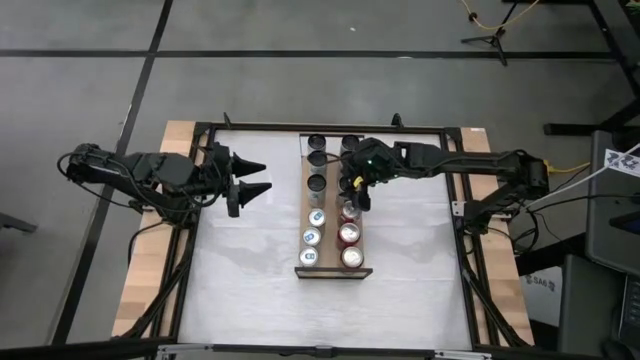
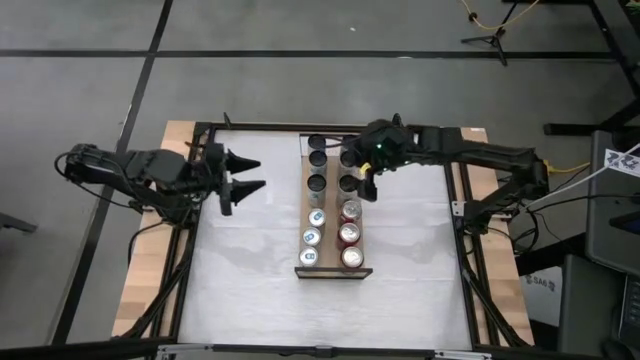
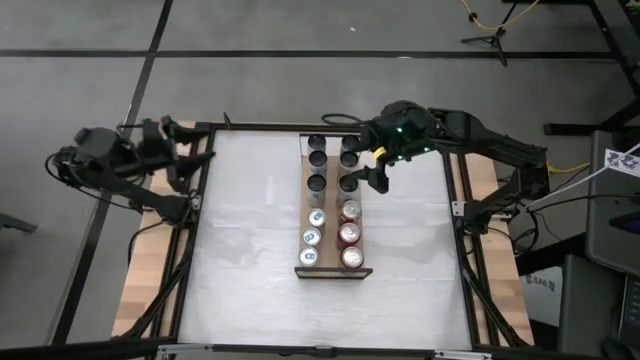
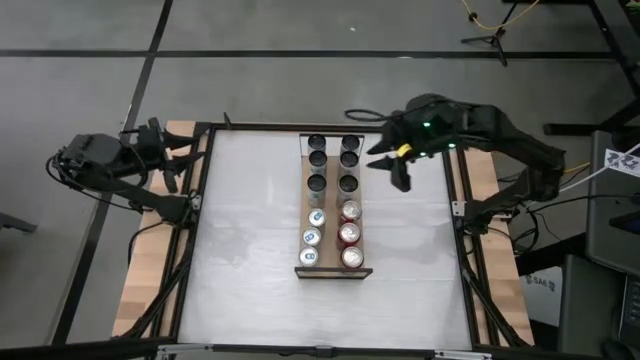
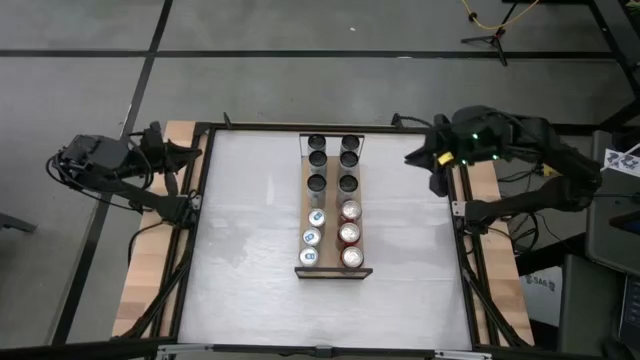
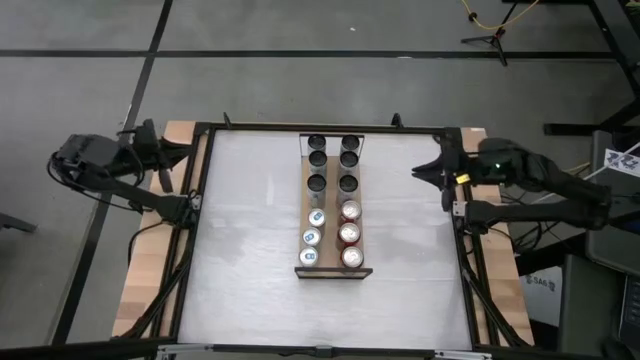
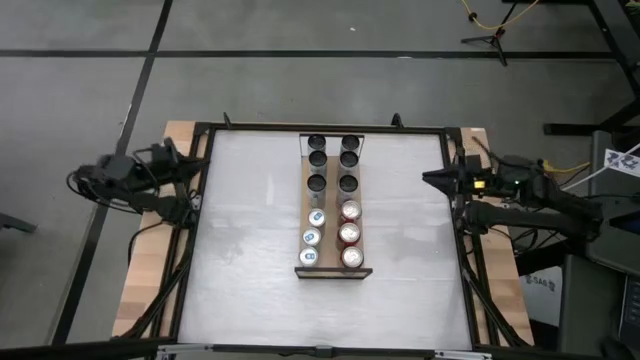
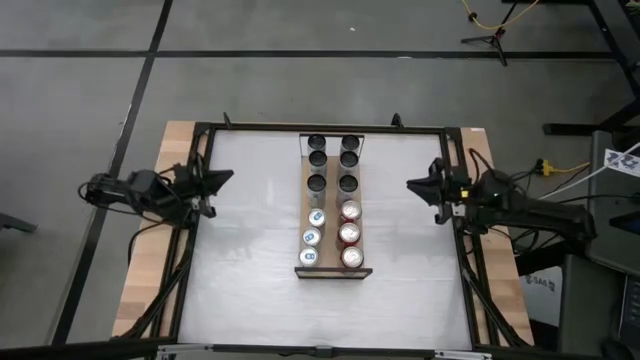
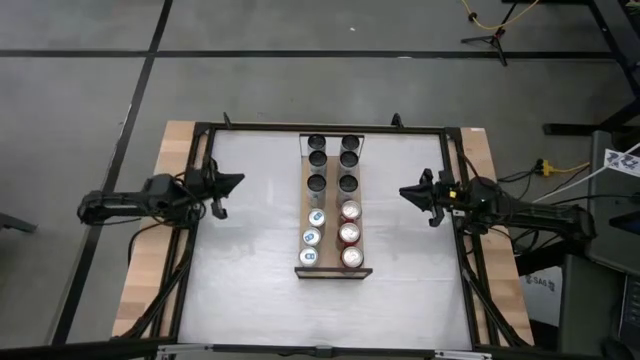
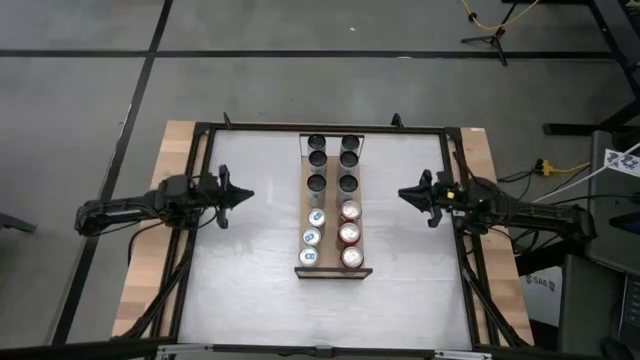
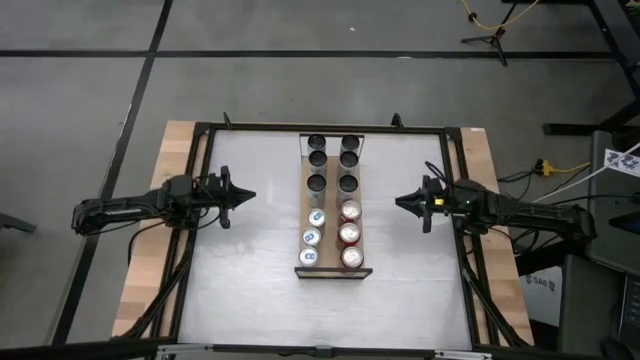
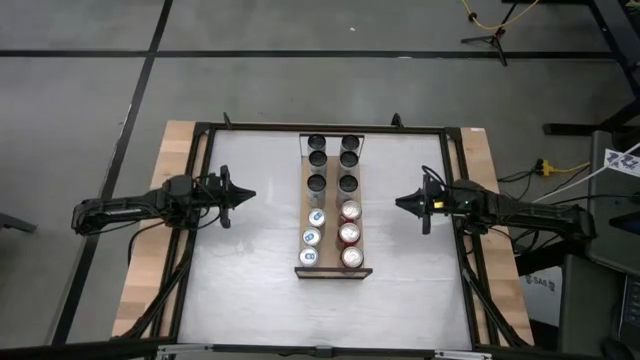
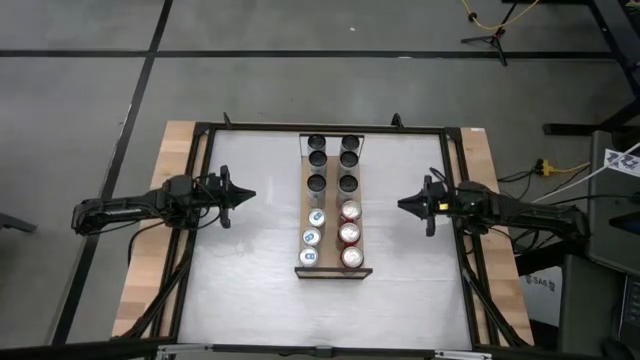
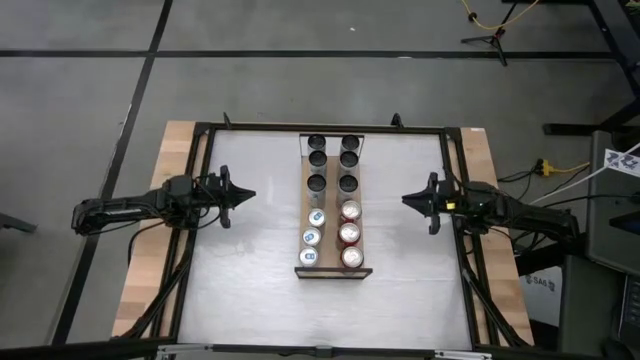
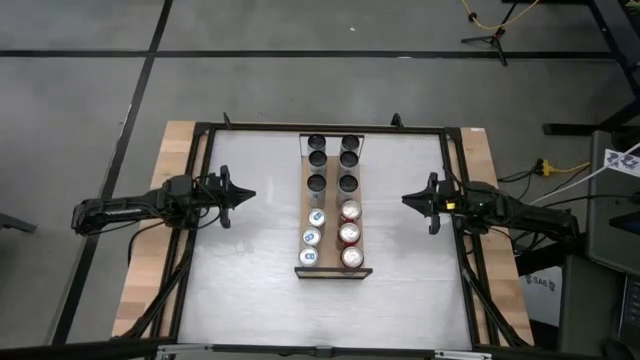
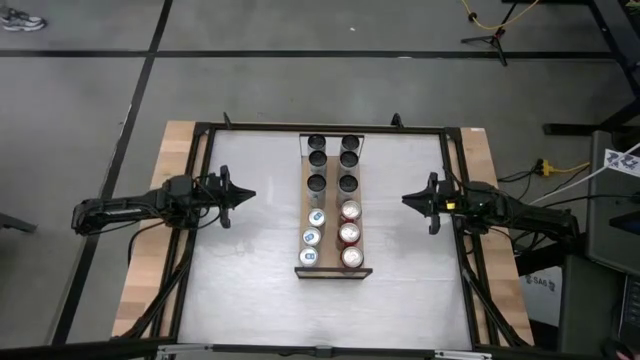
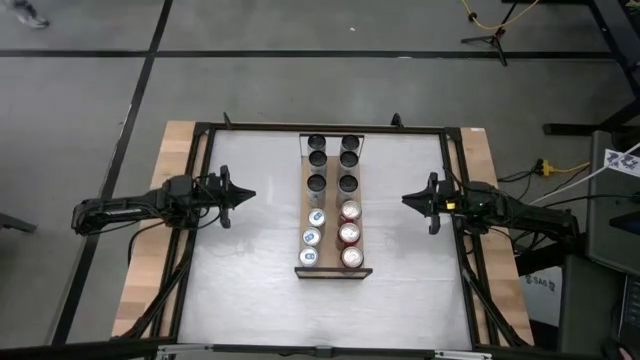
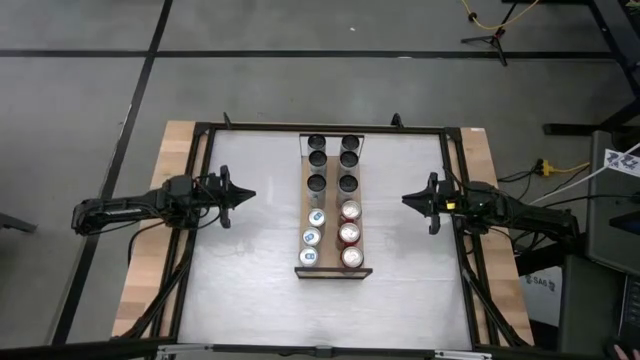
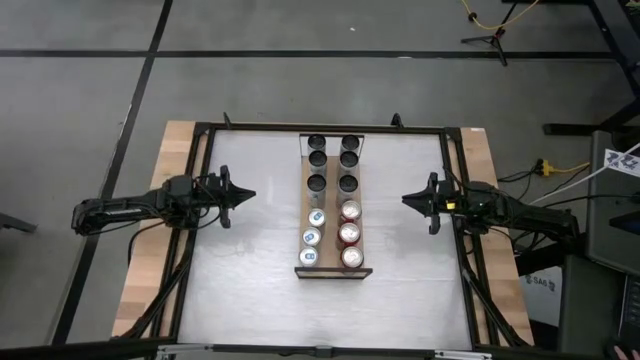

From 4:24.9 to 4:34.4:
Task: Place canned beverage on shelf
Return to Home Position

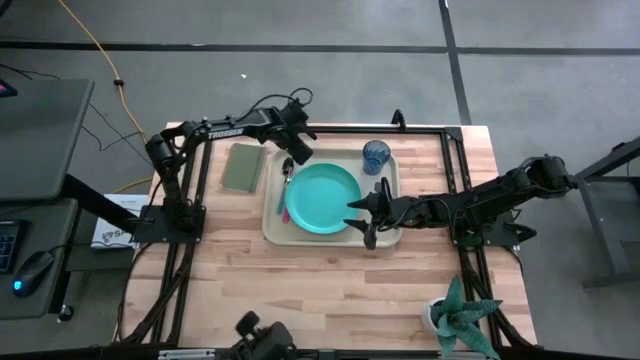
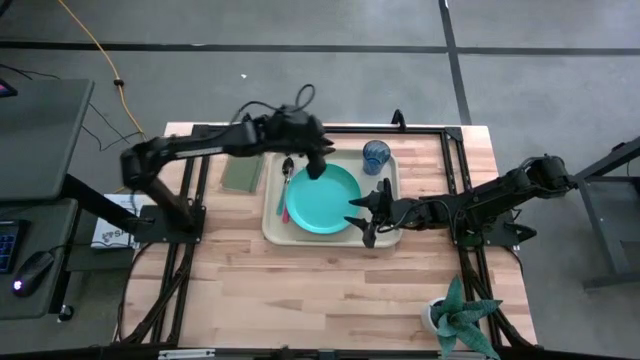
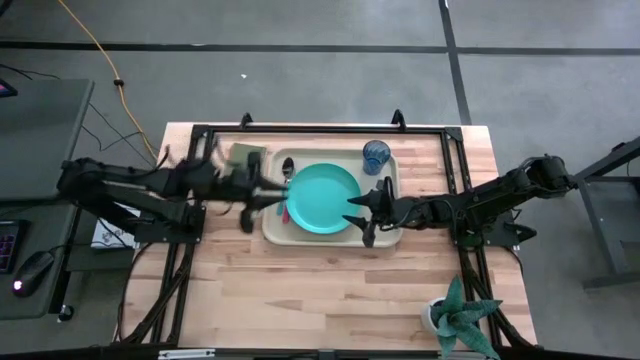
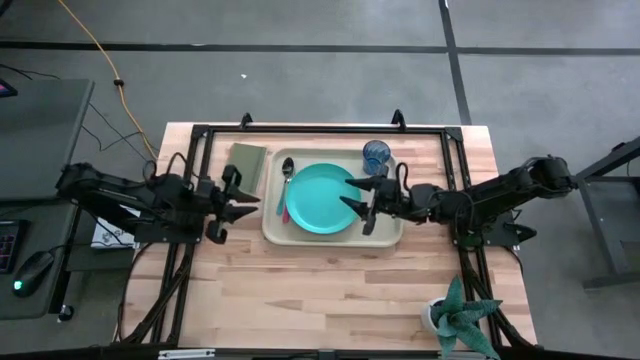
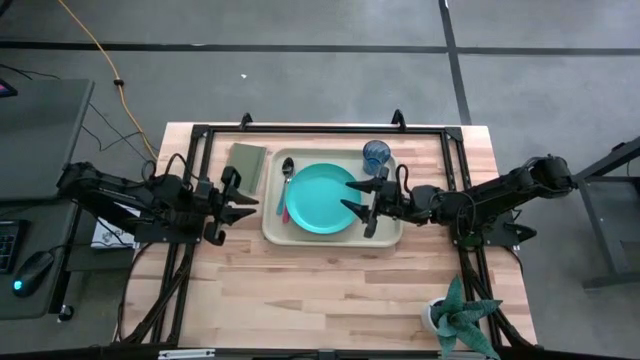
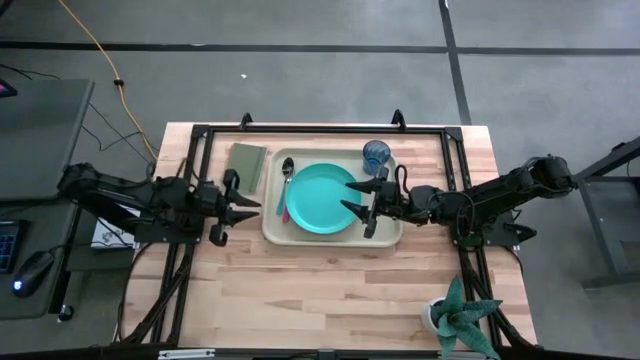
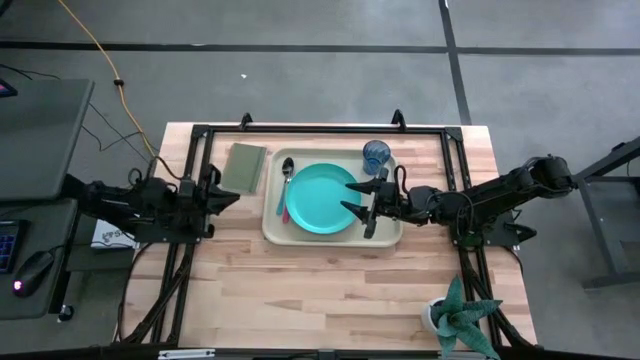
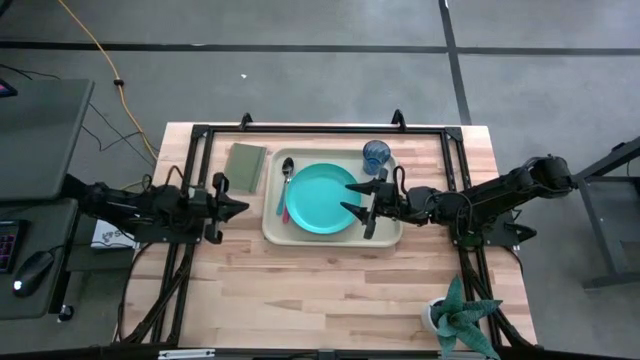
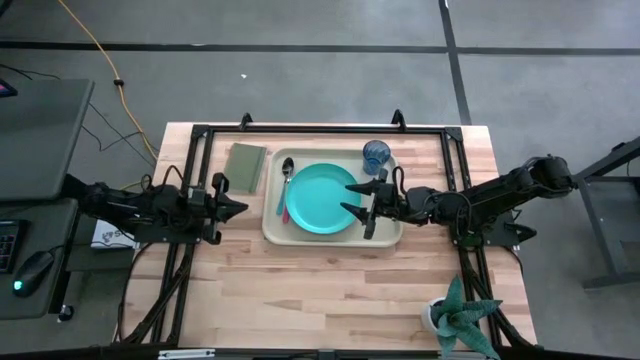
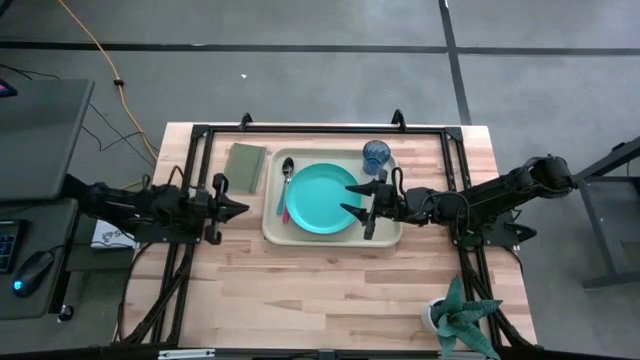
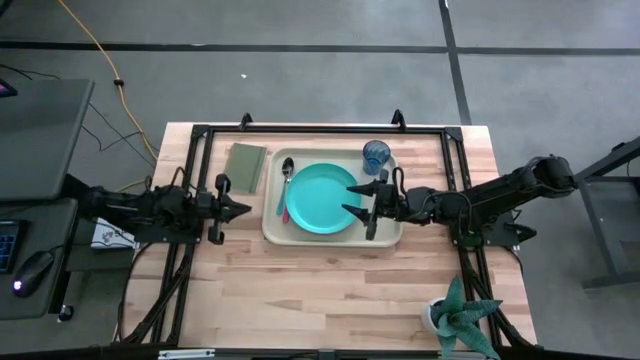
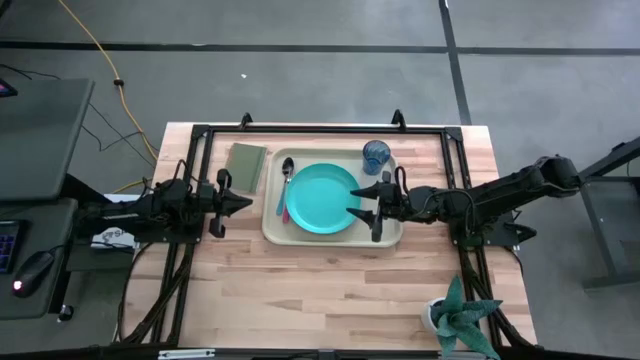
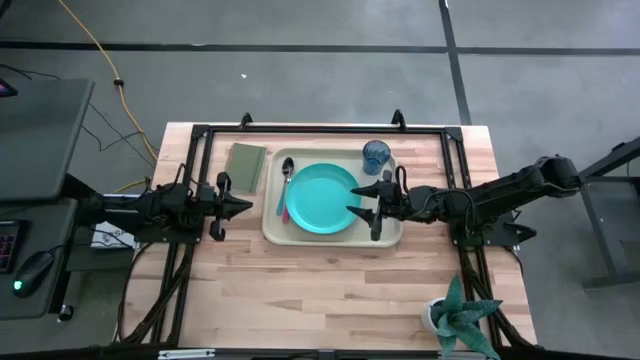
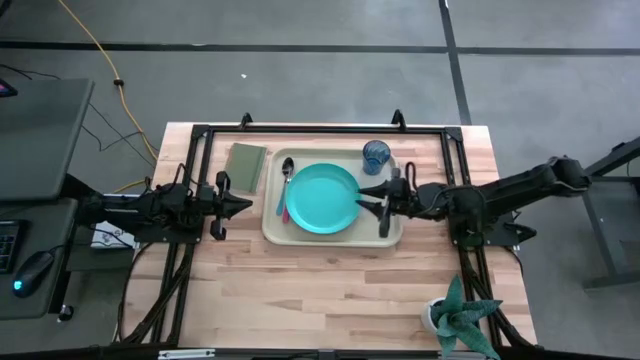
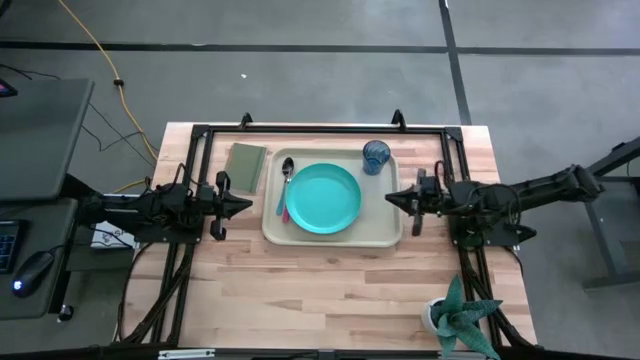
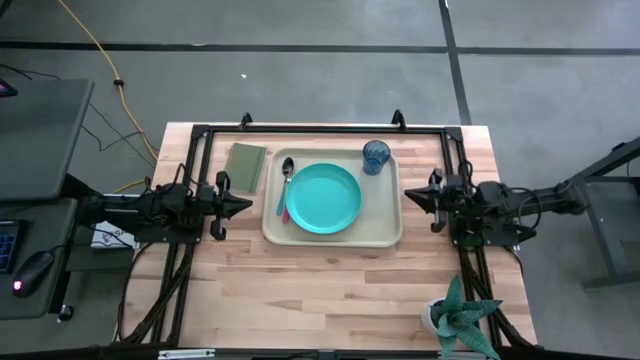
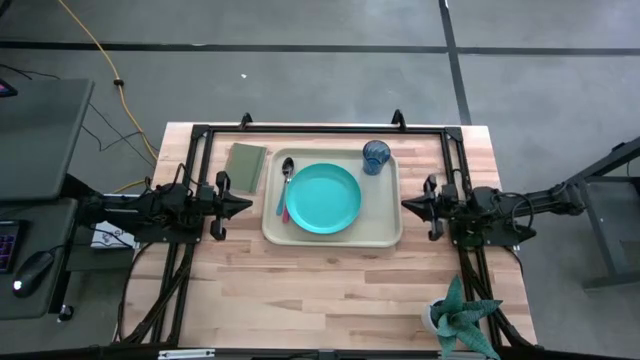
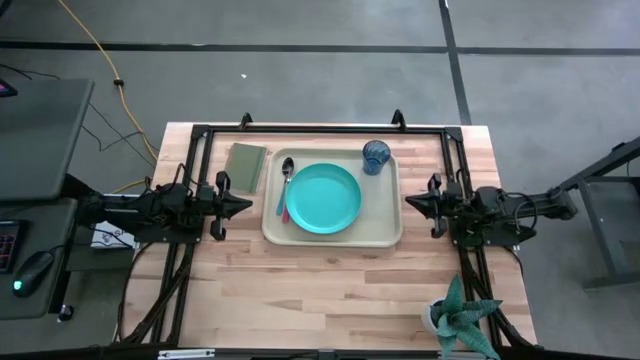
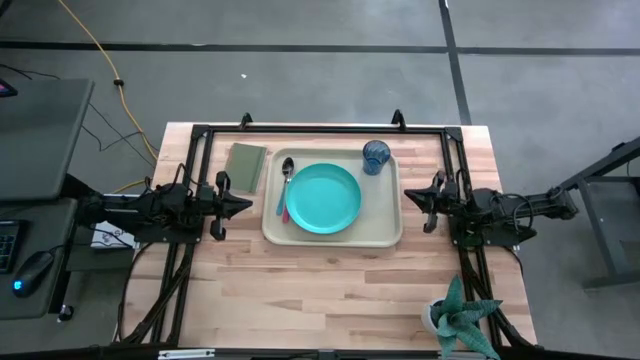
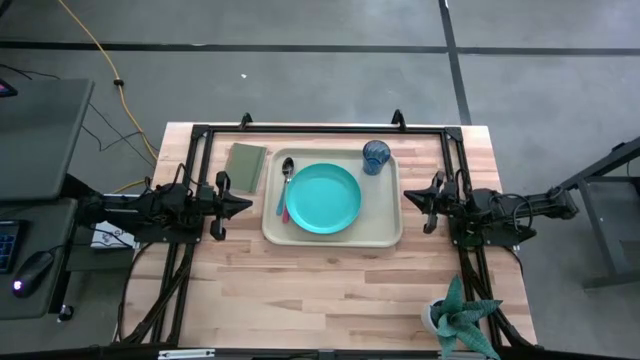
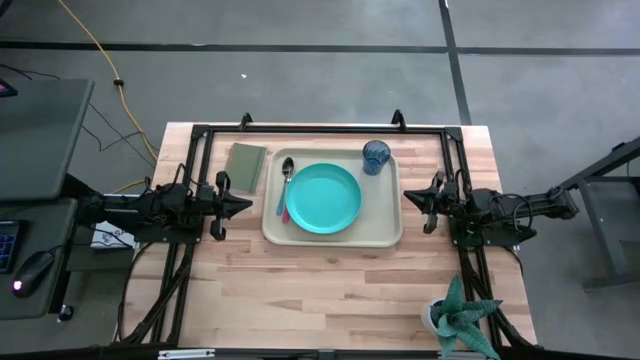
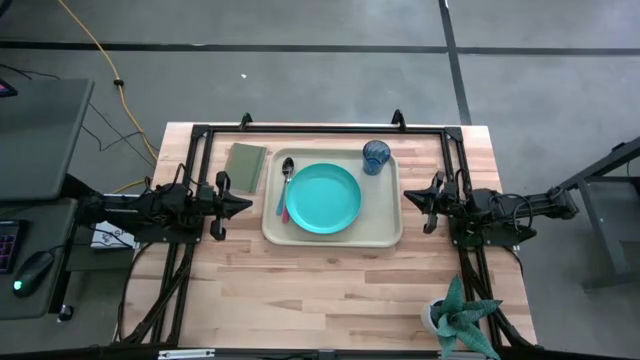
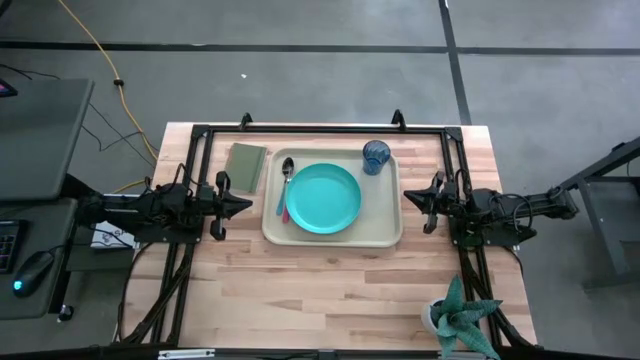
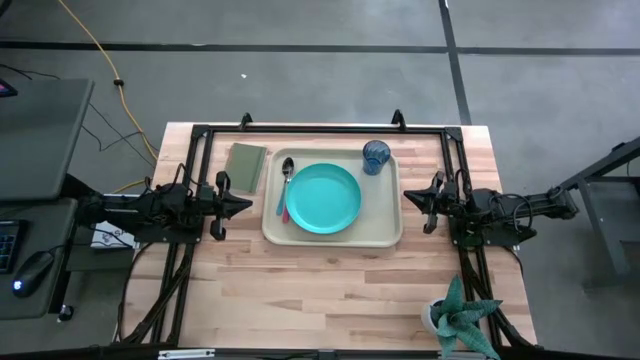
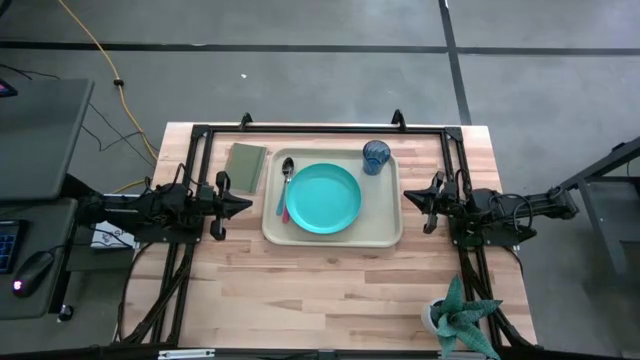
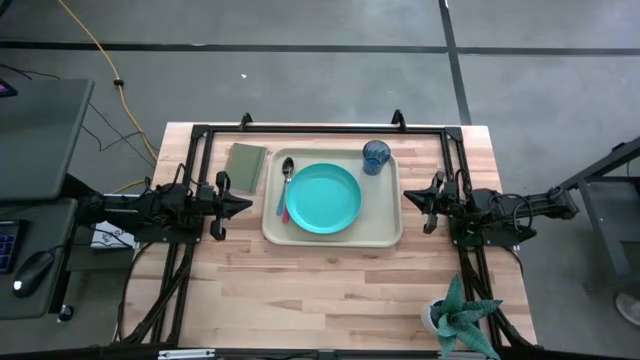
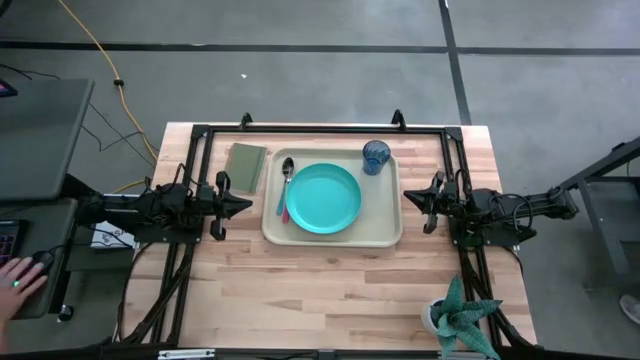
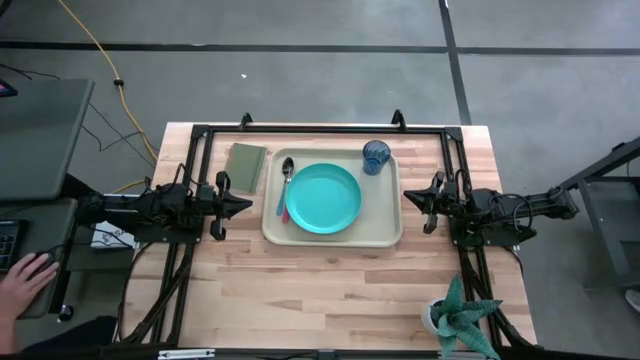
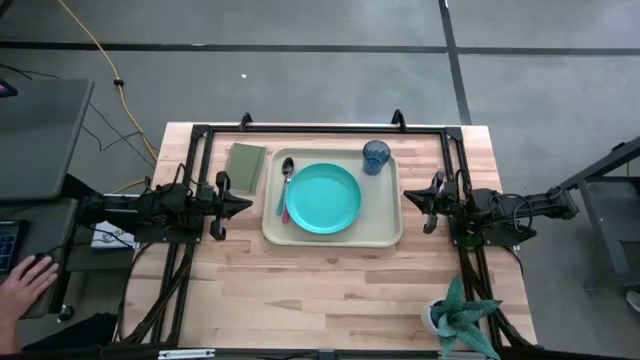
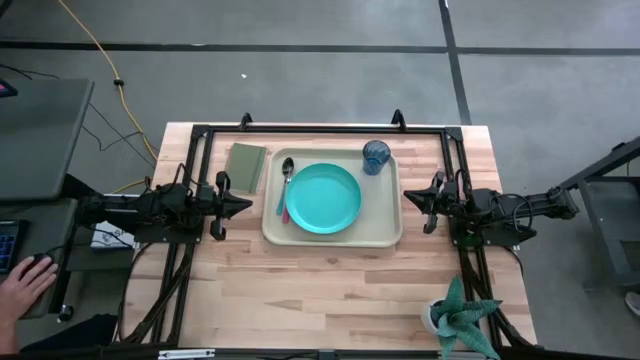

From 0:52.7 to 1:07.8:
Task: Pick and place plate/cup/fork/spoon on tray
Return to Home Position
